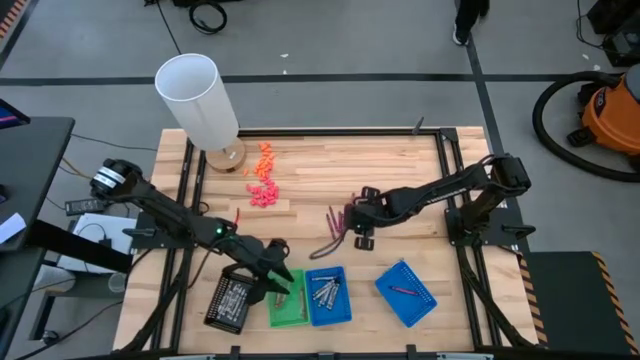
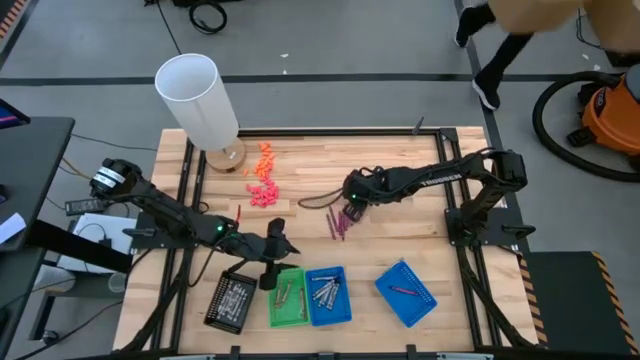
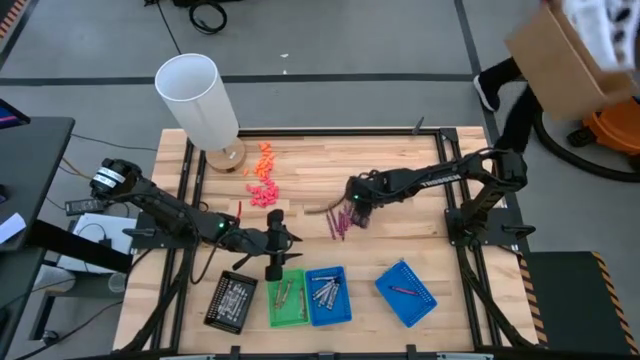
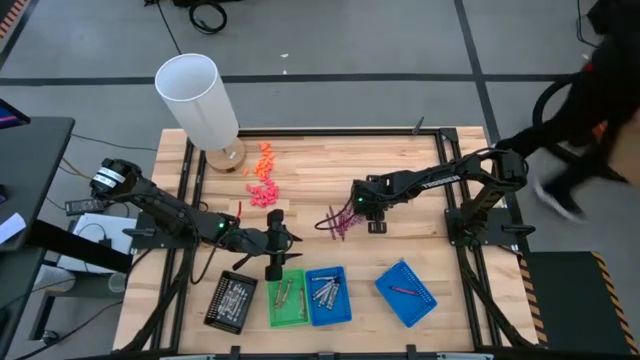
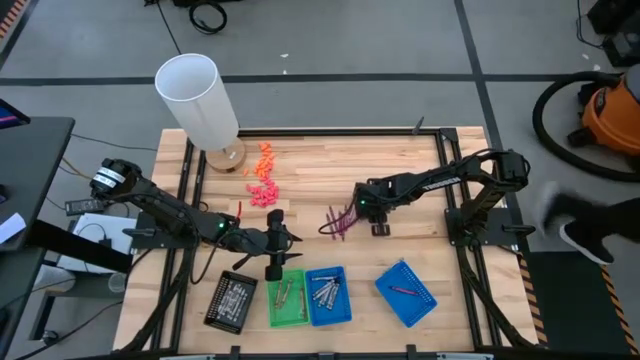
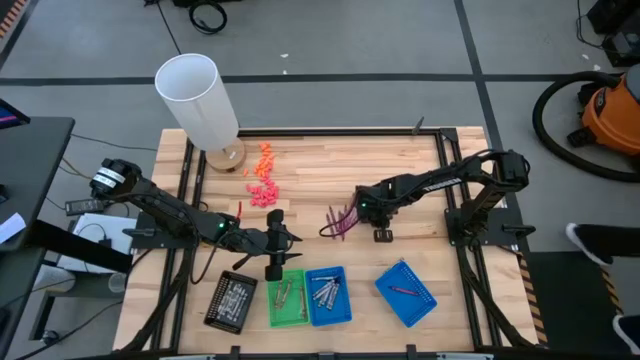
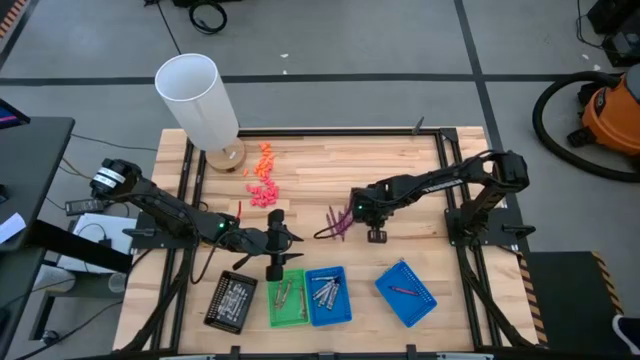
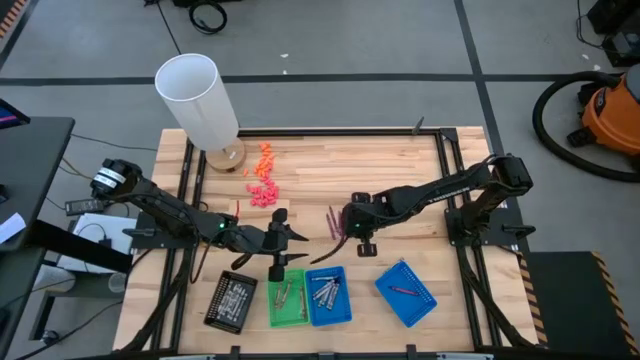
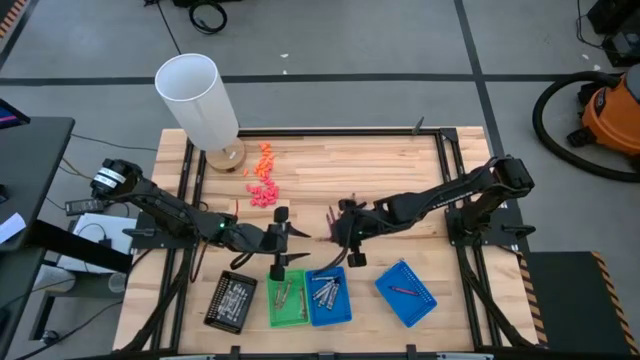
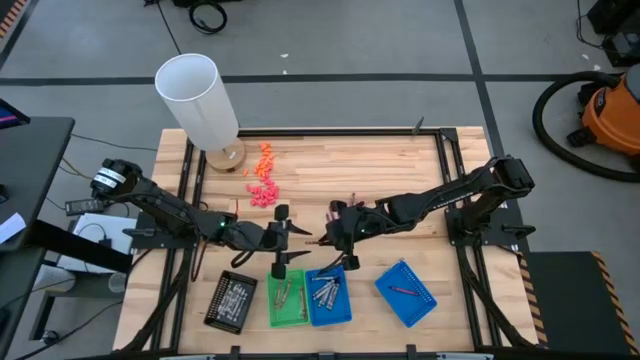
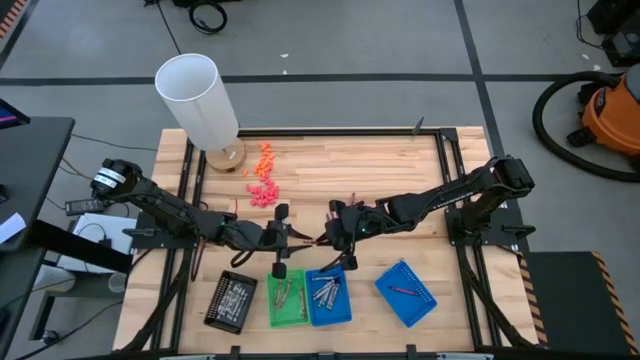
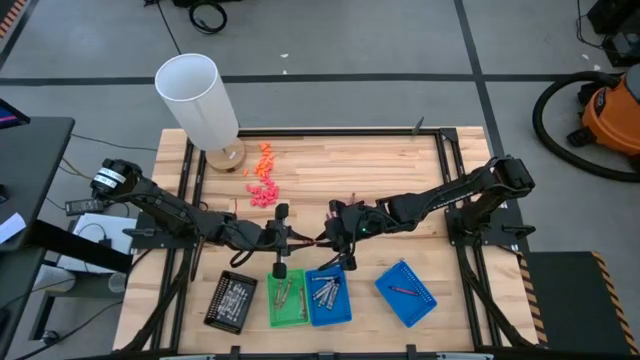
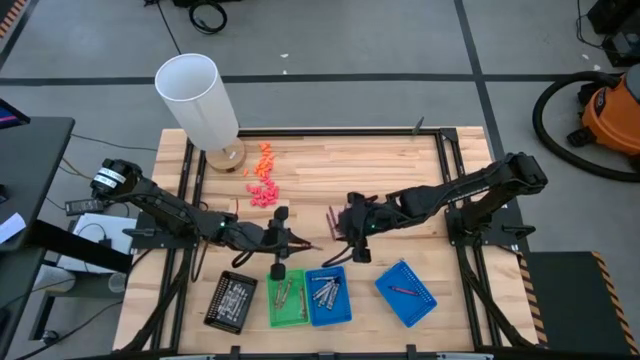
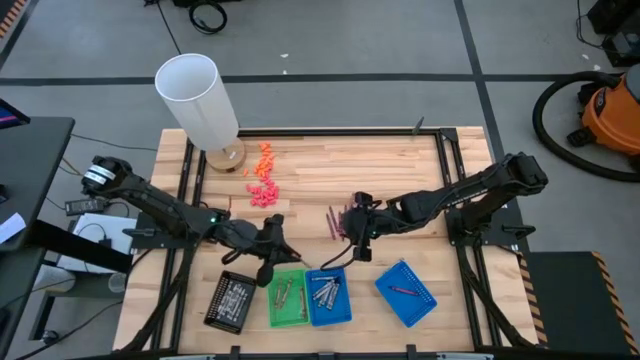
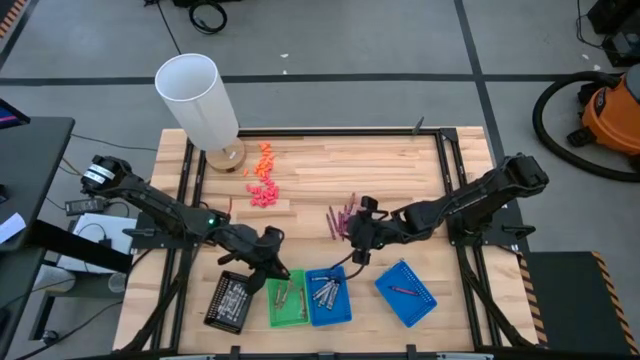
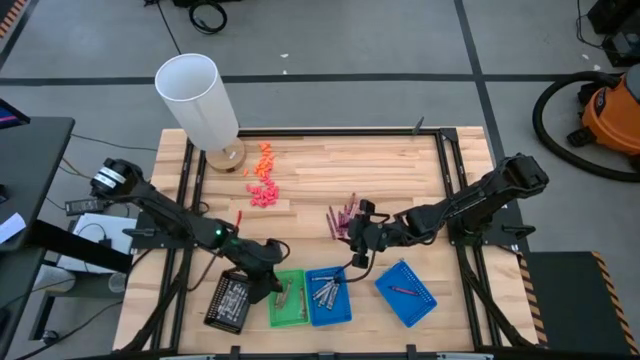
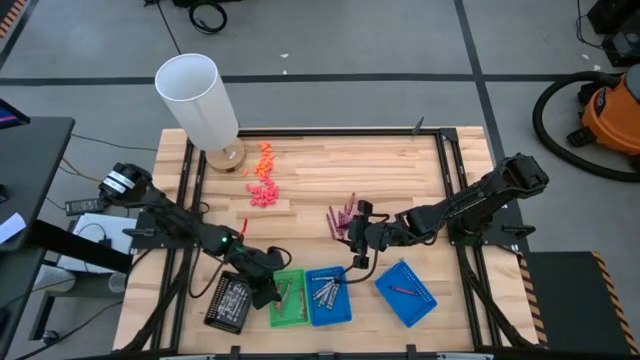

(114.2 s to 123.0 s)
Task: Sort crayons
Put the pink crayon into the green bin

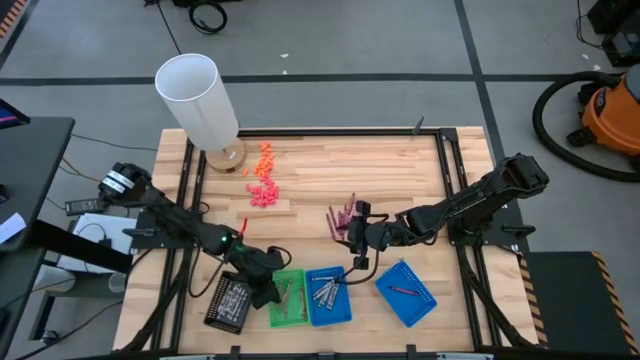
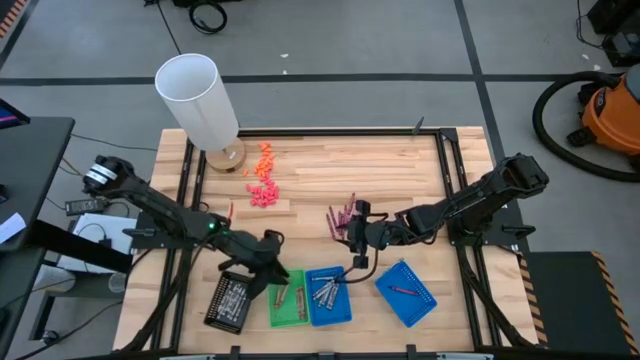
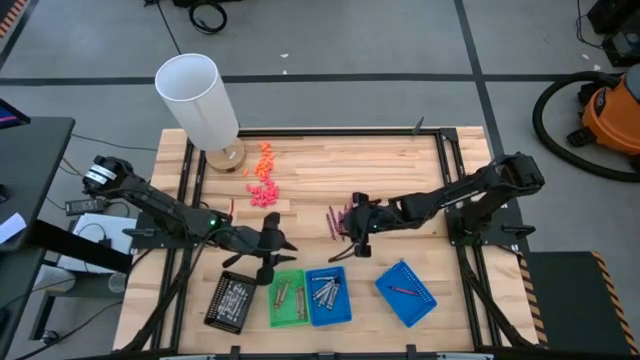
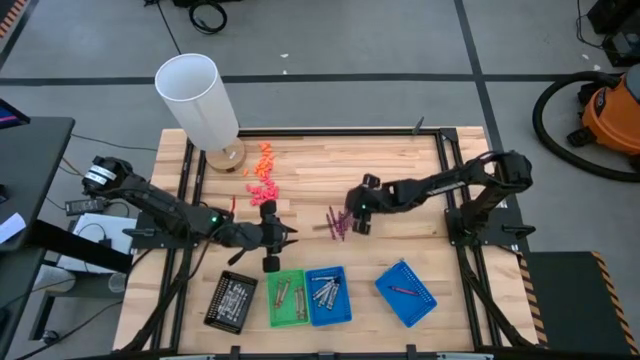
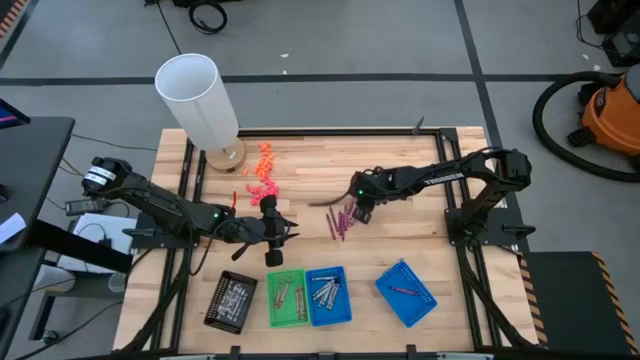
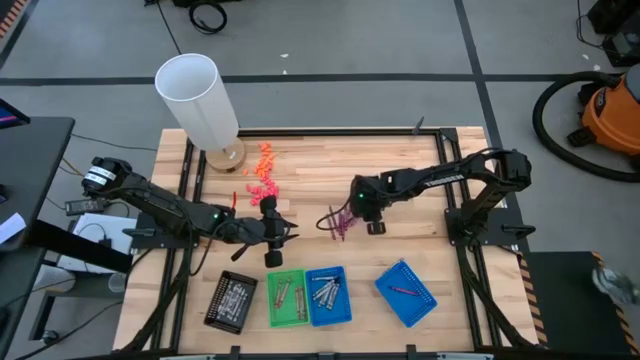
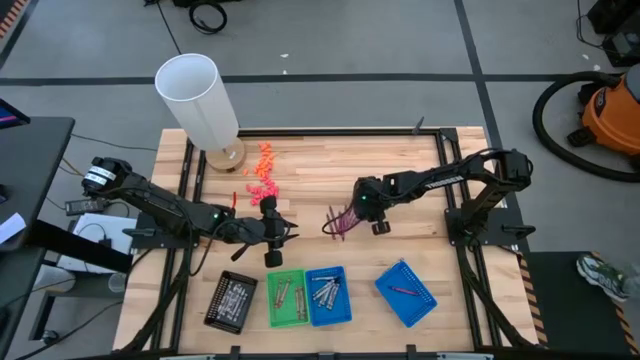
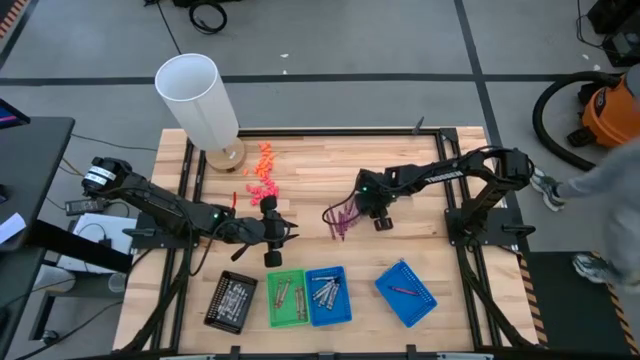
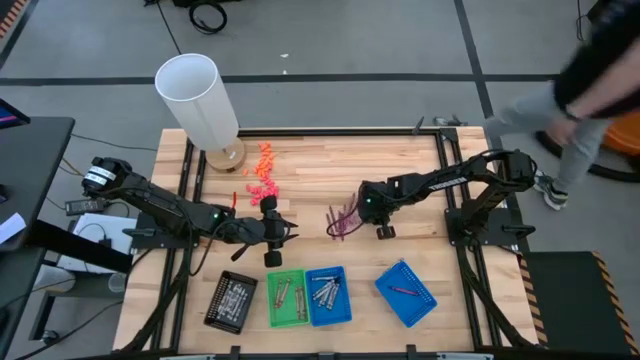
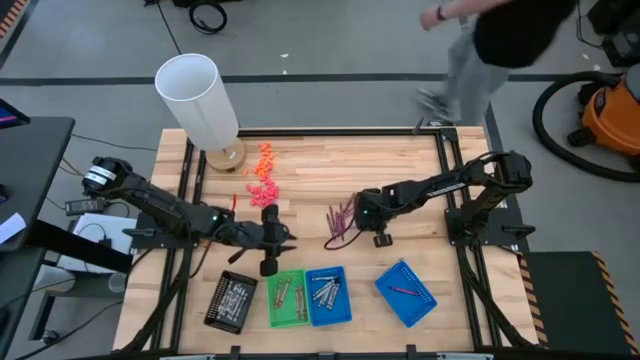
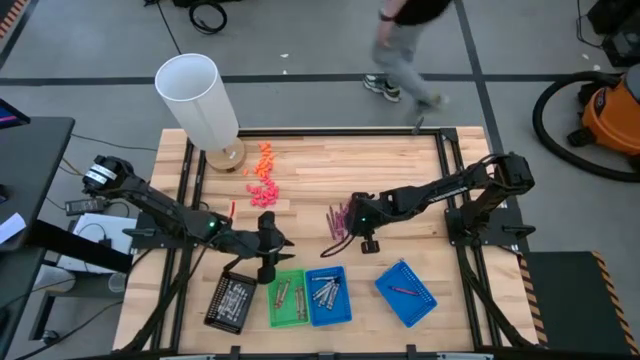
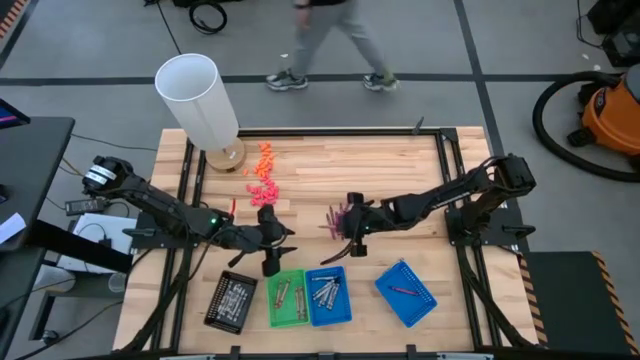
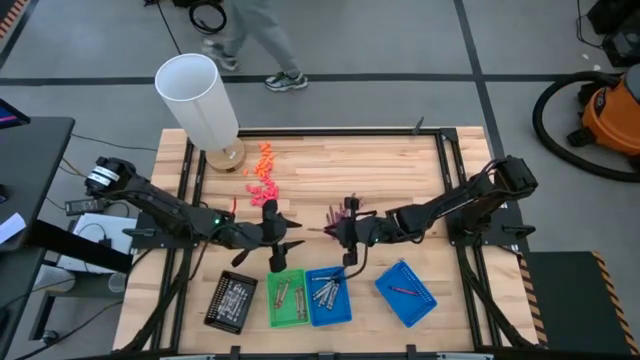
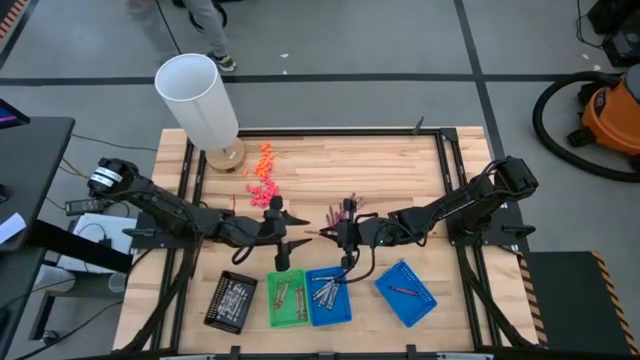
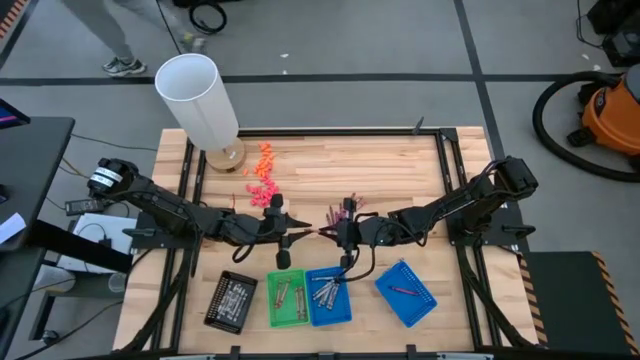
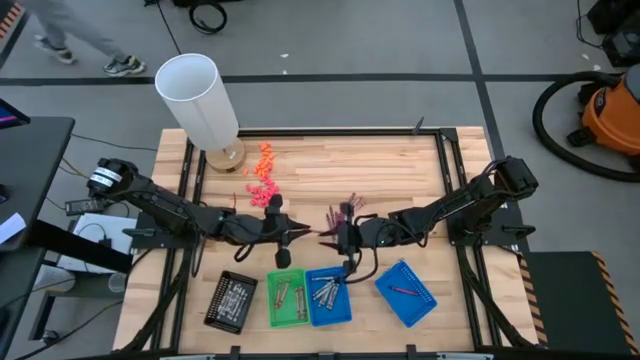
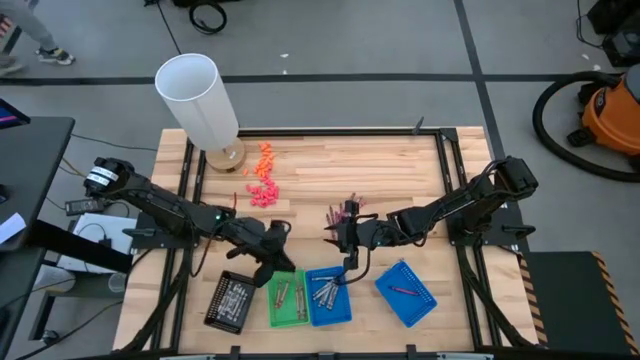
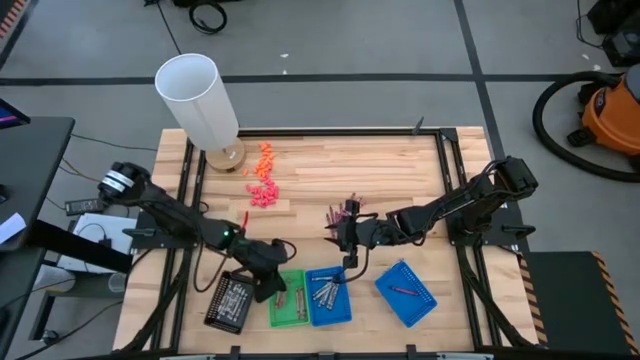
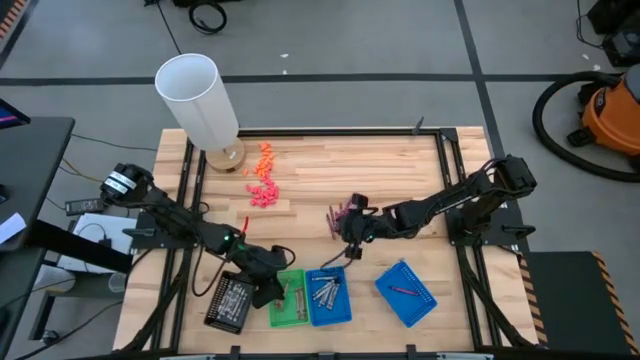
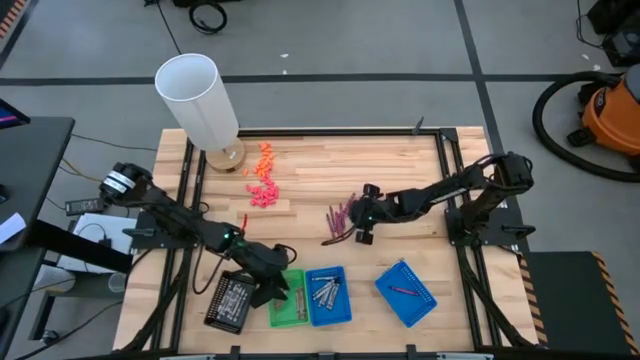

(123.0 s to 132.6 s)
Put the pink crayon into the green bin

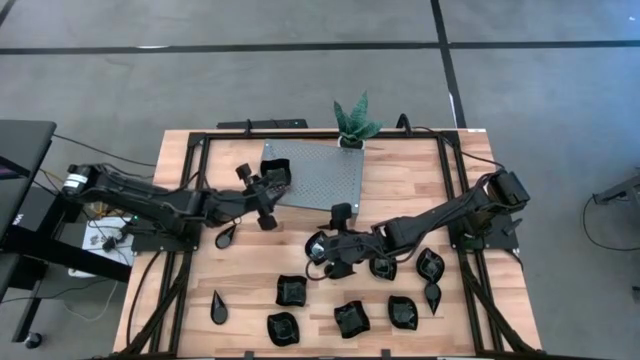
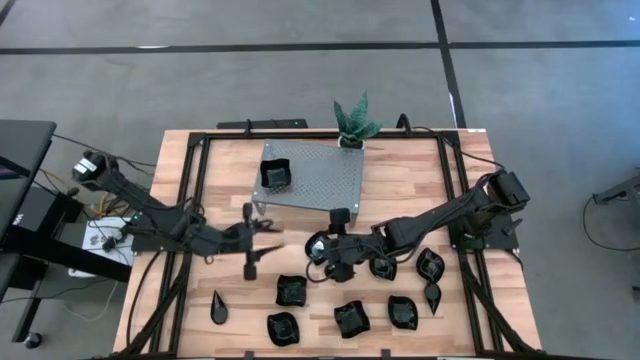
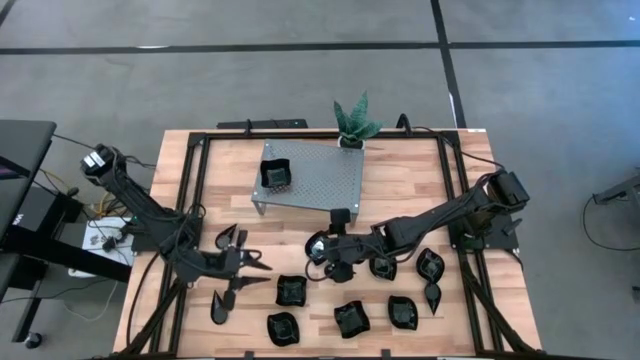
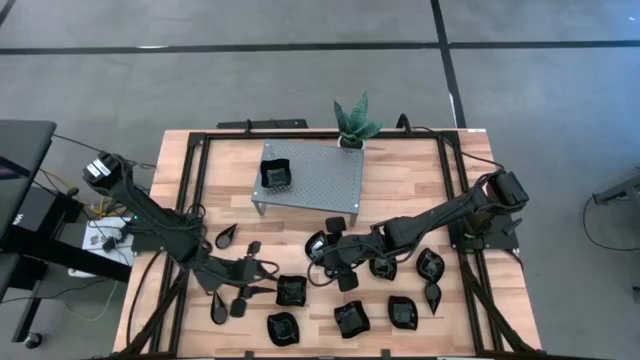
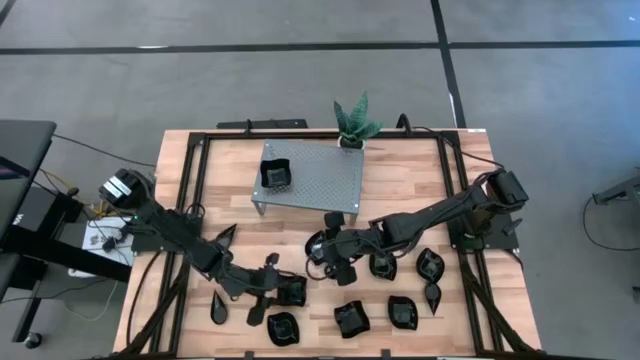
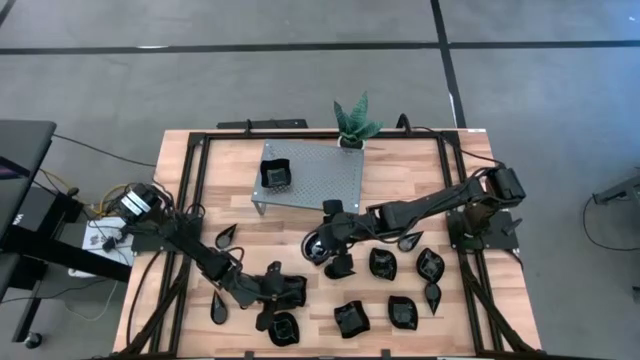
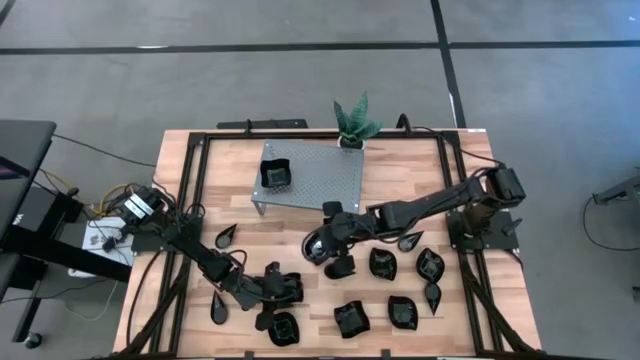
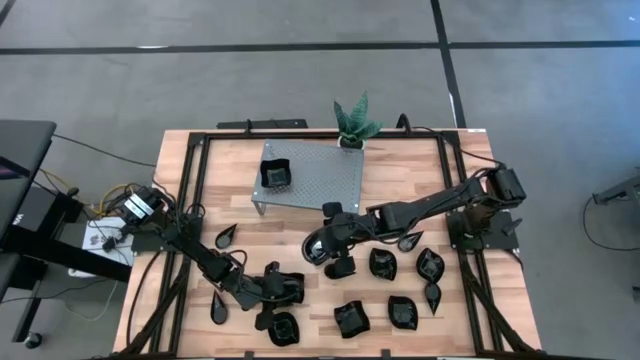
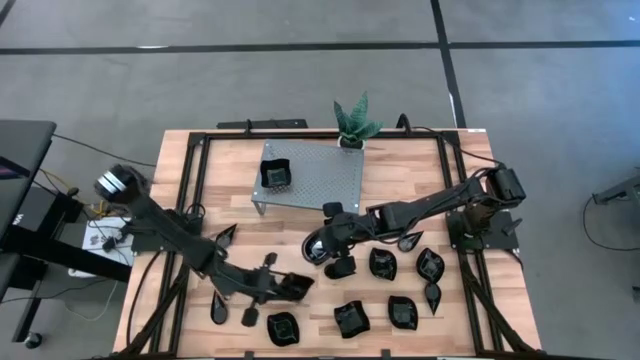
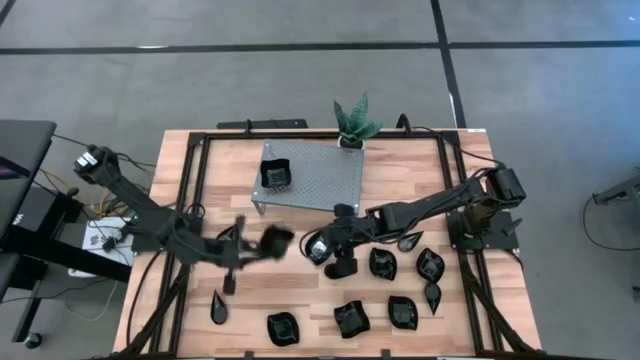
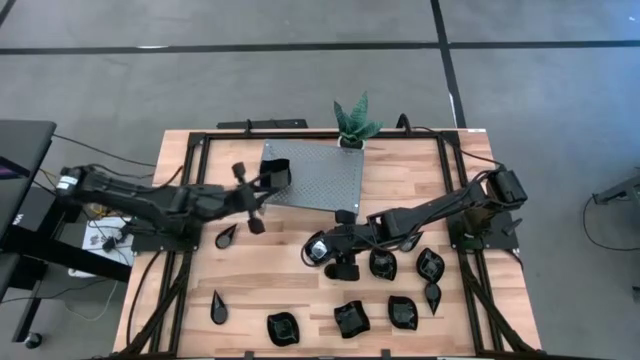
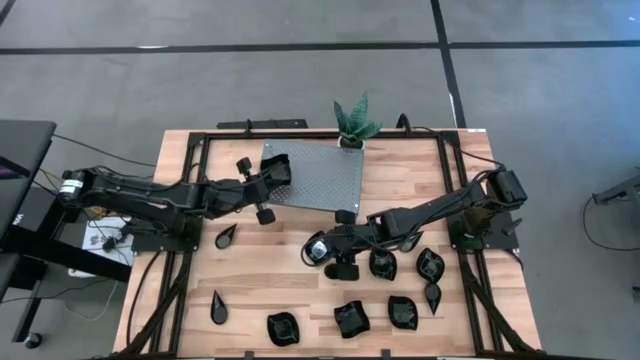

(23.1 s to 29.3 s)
Task: Pick & Place Mini shaped plates
Stack the black distorted square plate on top of the black distorted square plates on the shelf
